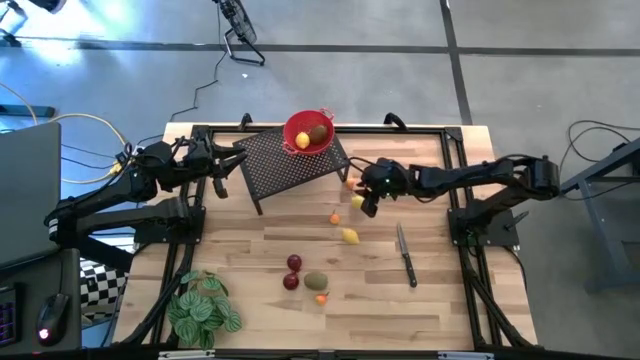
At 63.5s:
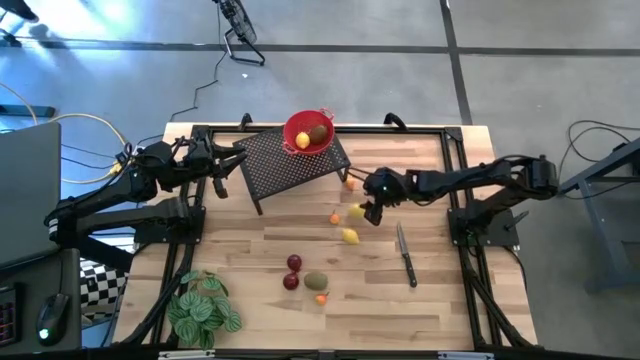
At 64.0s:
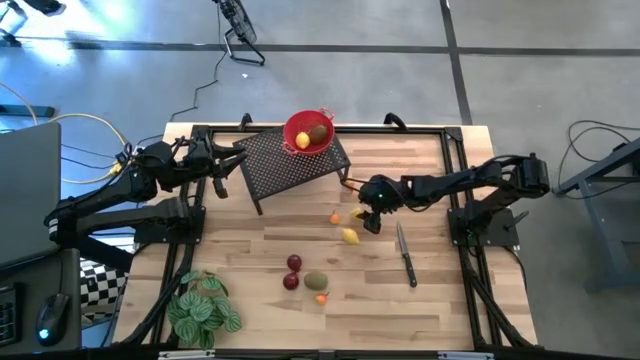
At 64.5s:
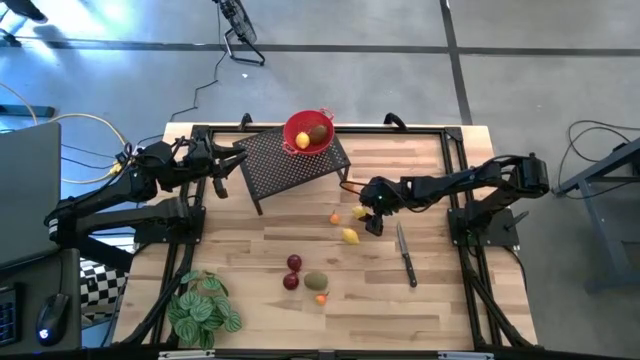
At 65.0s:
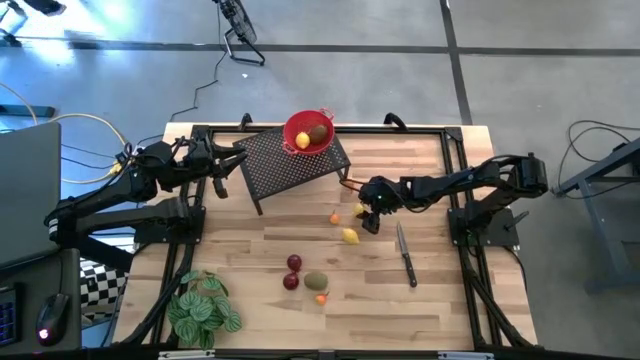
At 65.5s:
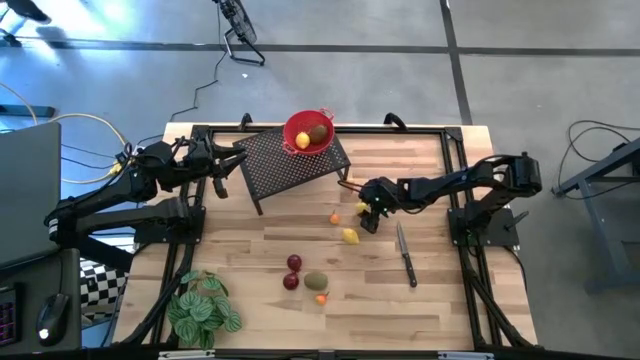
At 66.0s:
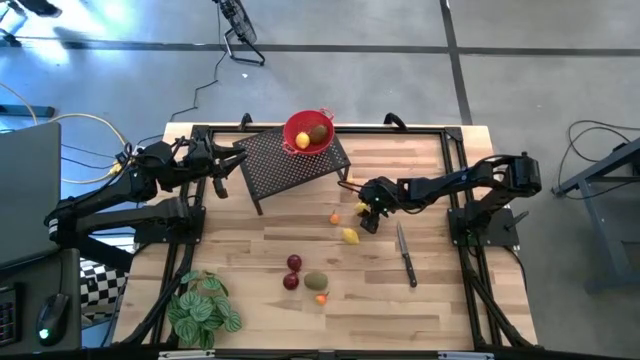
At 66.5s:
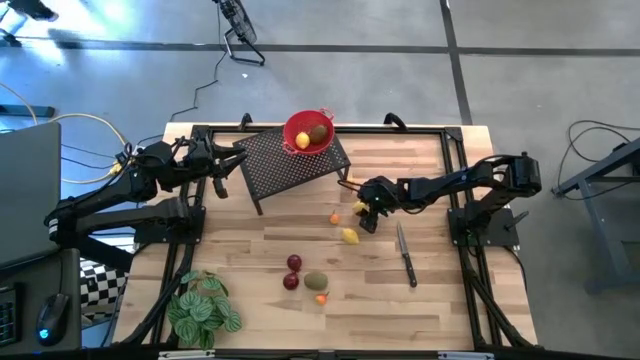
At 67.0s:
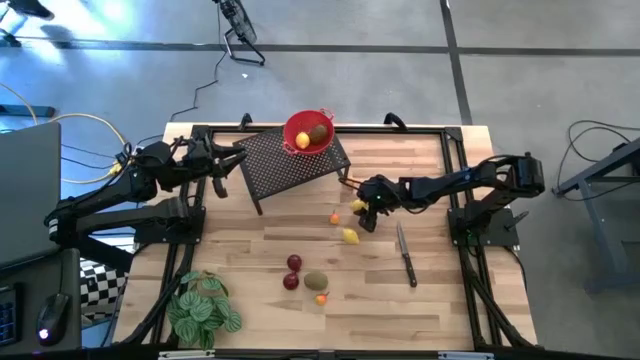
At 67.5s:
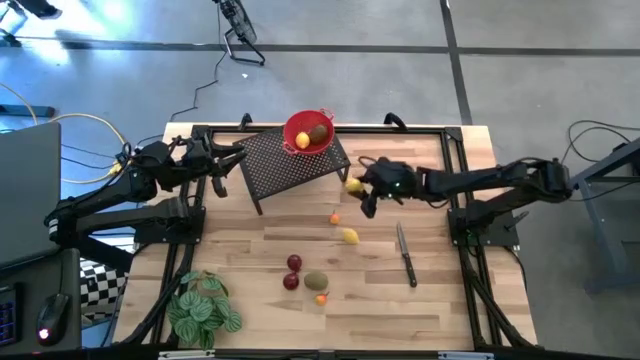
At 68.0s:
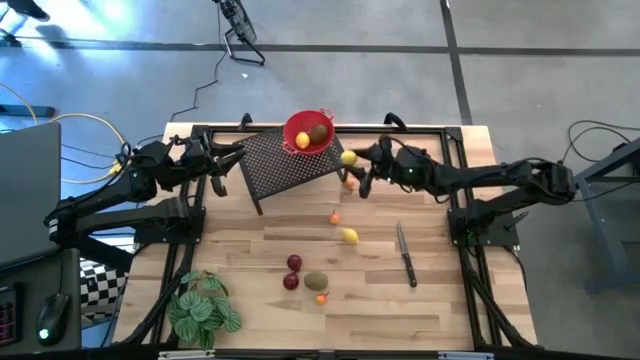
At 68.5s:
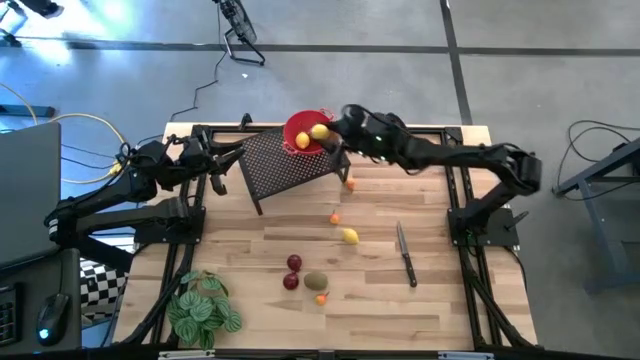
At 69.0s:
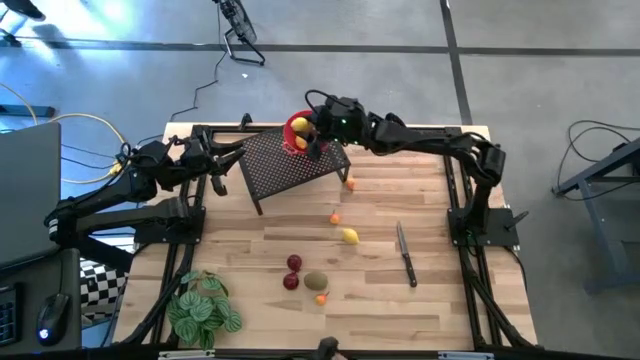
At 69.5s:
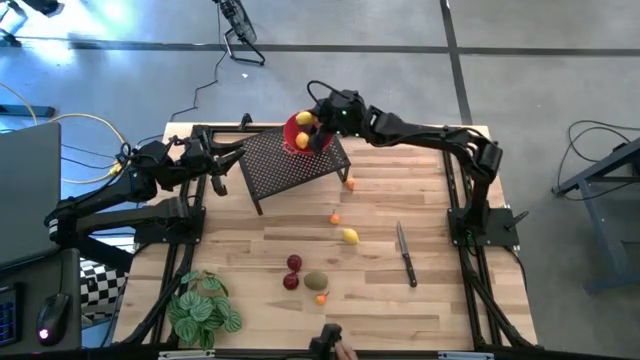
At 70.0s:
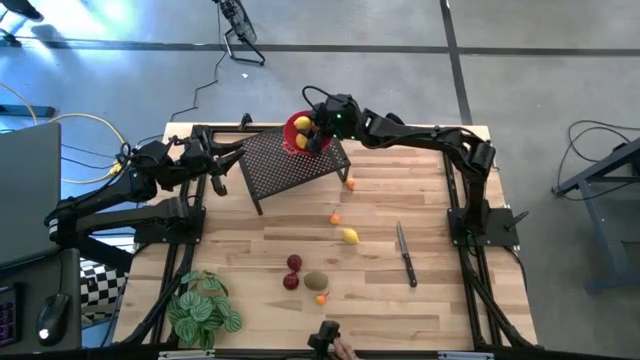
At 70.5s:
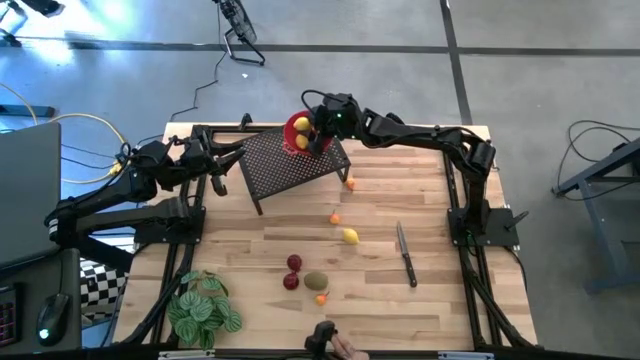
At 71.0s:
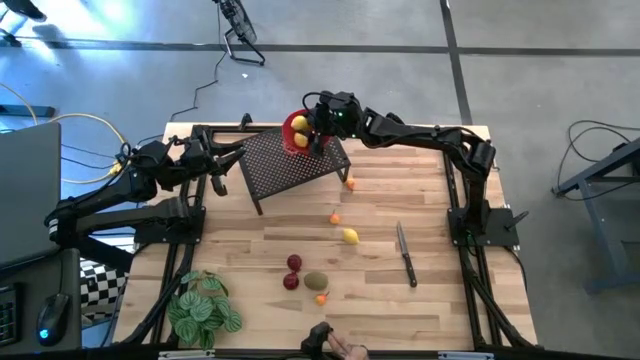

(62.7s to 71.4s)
Task: Pick & Place Fruit
Put the top lemon into the red strainer bowl on the shelf

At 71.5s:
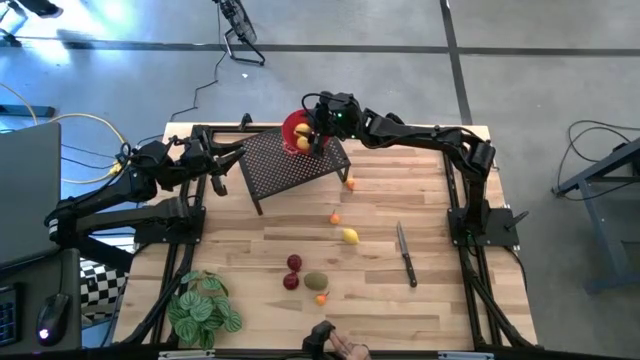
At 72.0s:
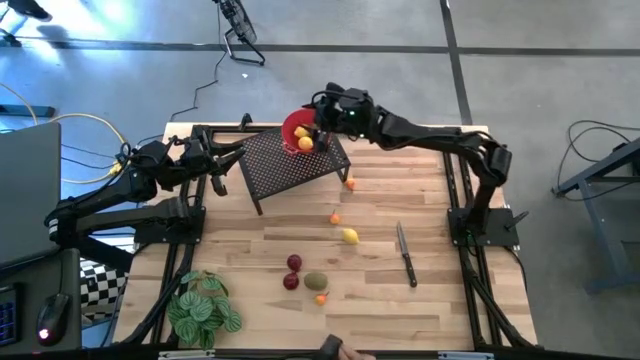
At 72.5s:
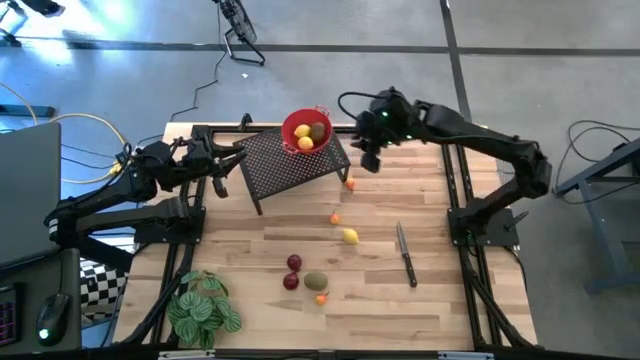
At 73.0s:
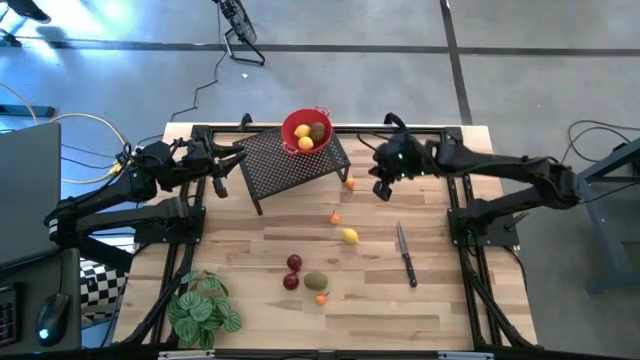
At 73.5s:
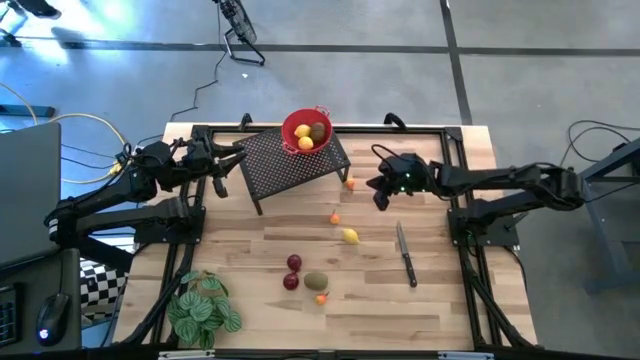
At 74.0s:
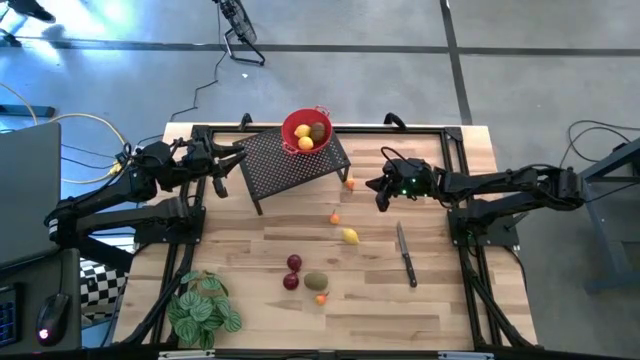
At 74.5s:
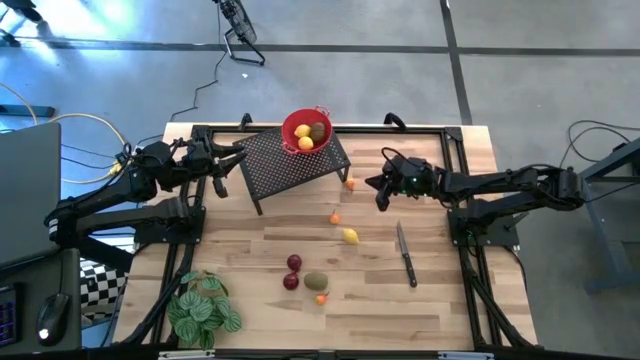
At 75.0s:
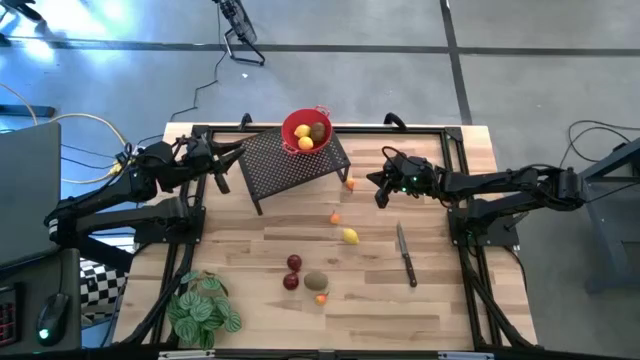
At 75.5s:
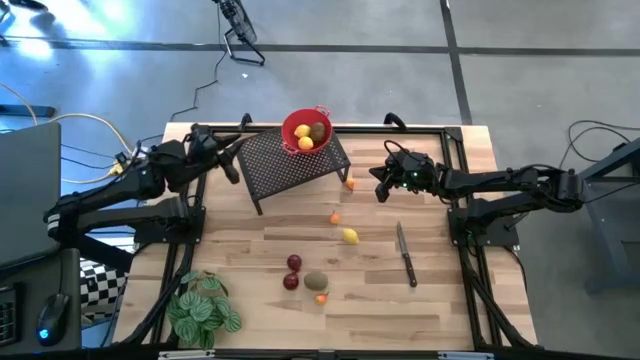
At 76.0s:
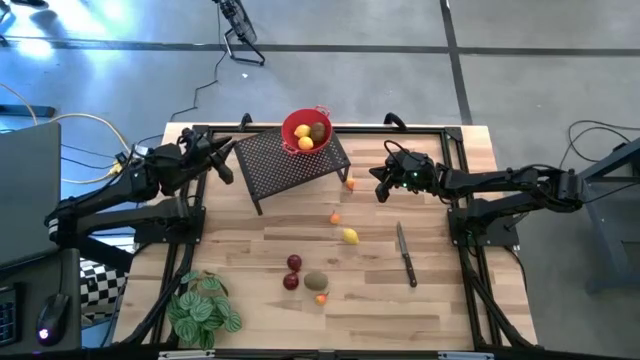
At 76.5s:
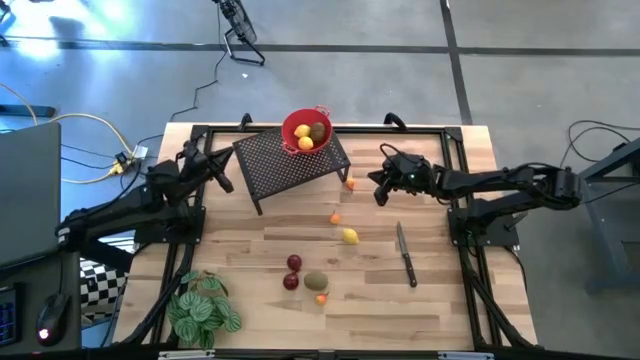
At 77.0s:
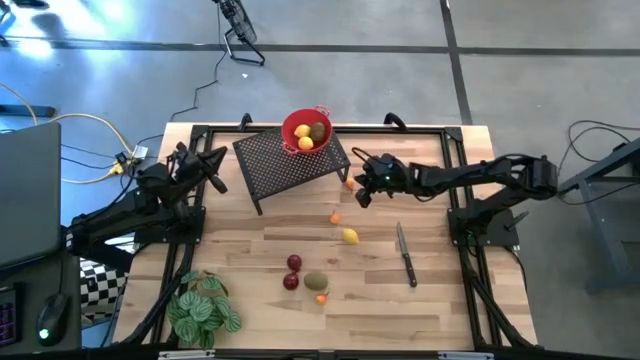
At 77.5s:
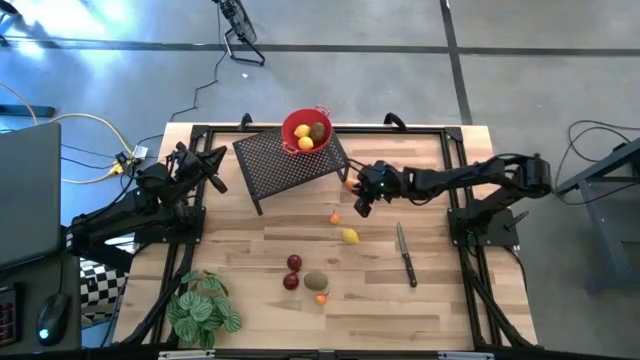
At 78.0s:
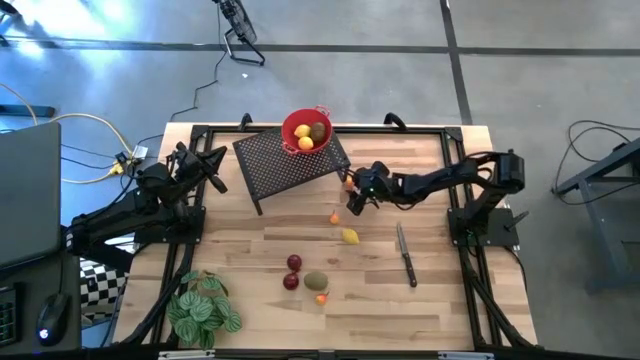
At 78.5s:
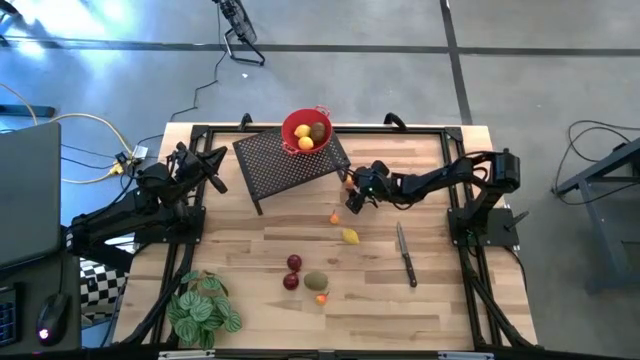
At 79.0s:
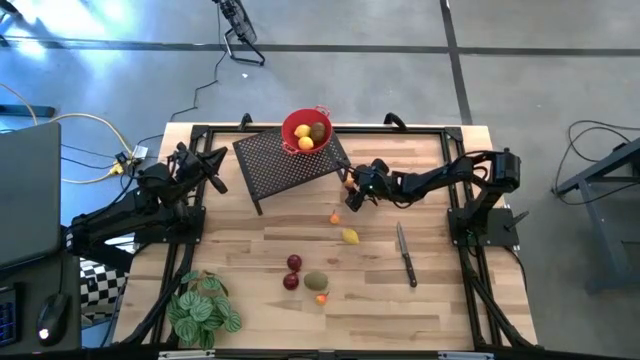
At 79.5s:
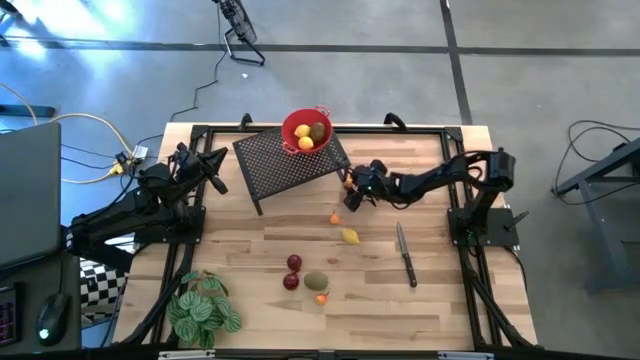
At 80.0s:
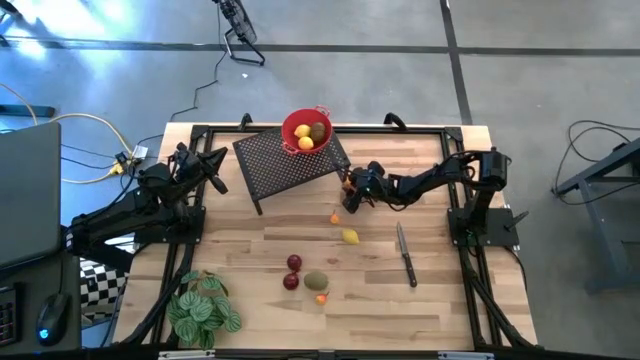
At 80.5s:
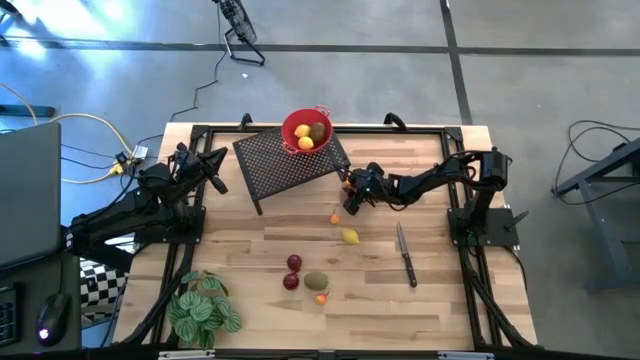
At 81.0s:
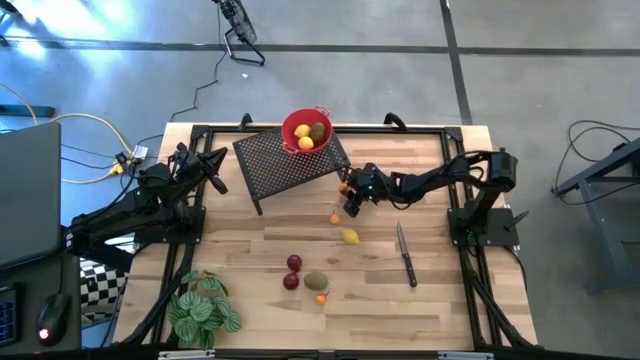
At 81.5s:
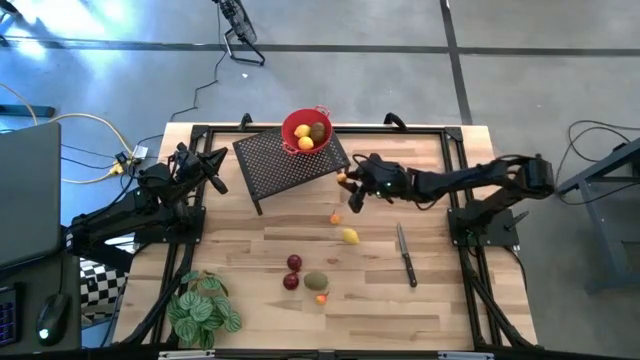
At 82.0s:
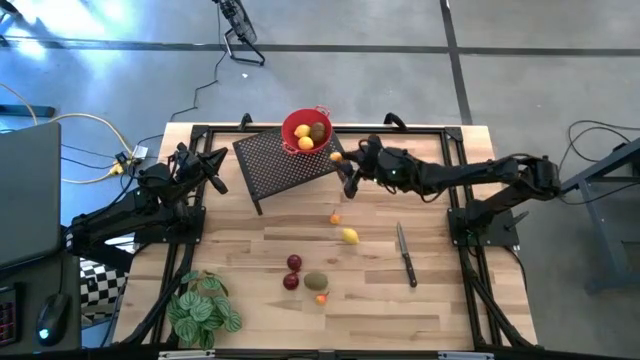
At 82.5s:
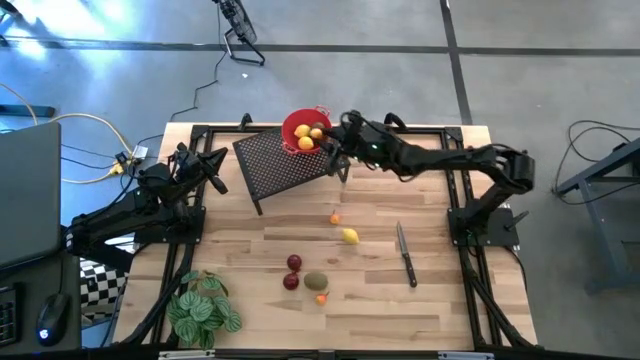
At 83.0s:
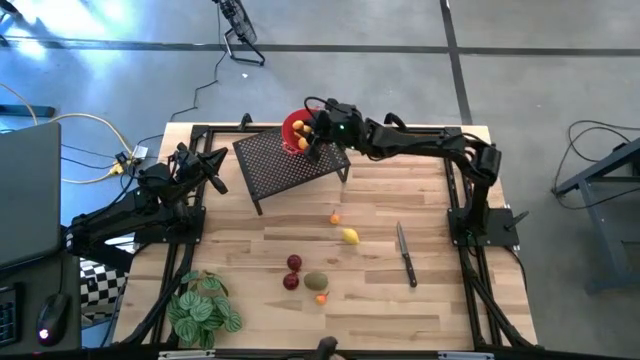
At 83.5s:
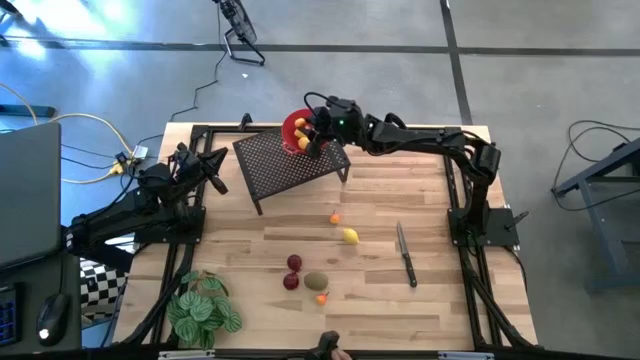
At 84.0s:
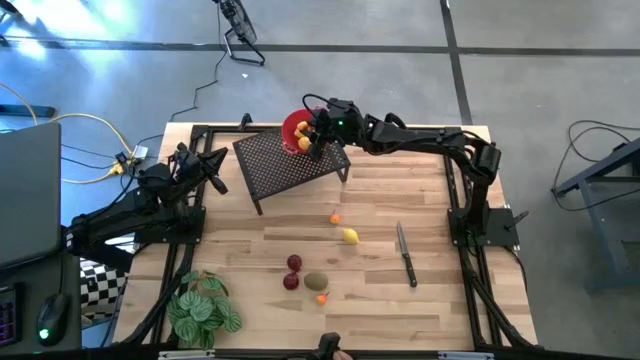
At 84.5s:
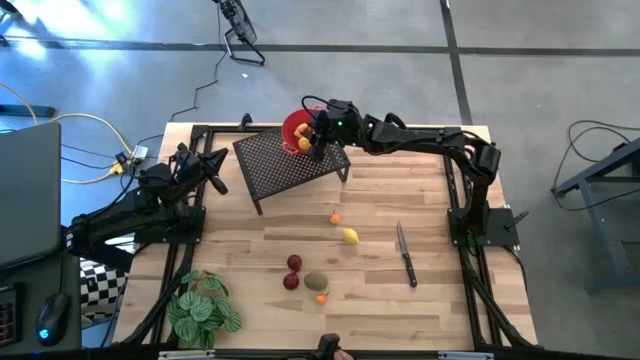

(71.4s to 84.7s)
Put the top pear into the red strainer bowl on the shelf
